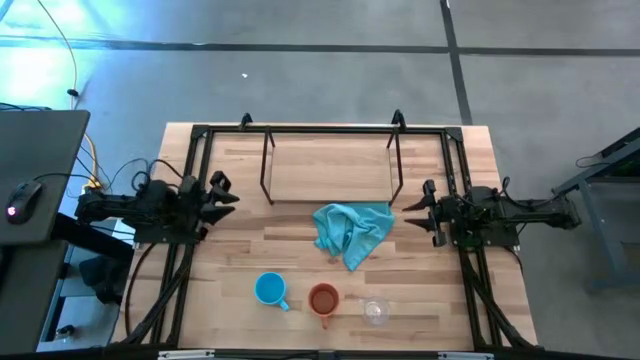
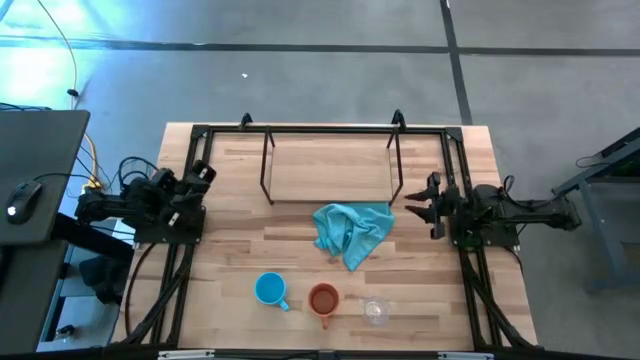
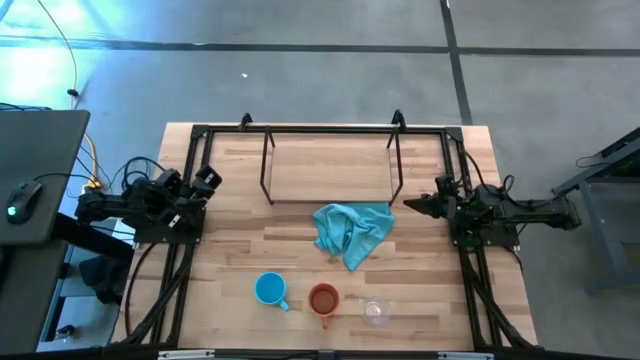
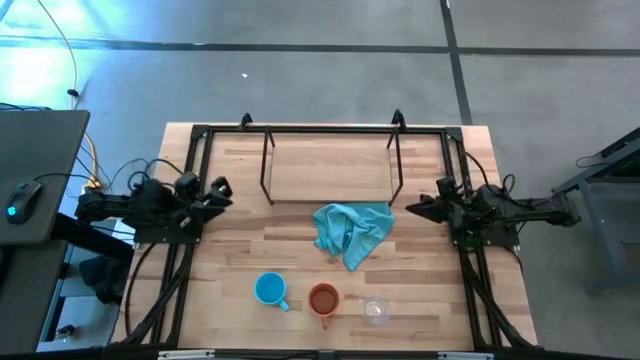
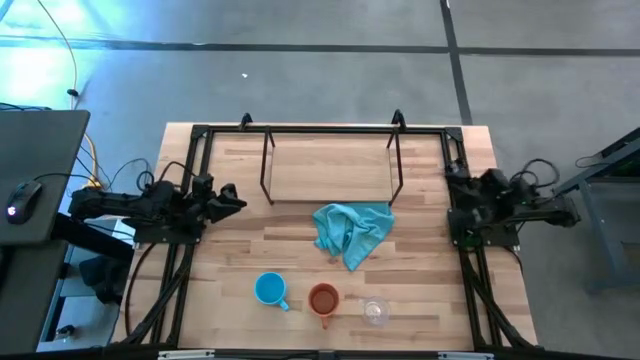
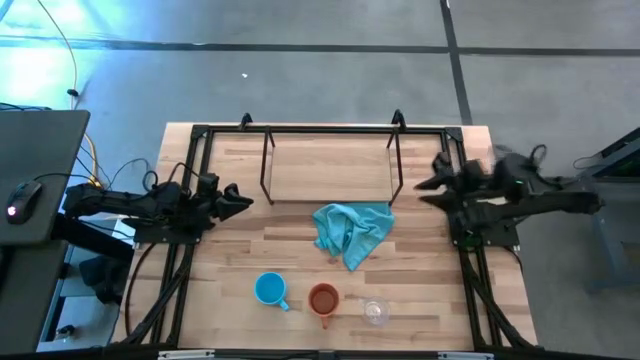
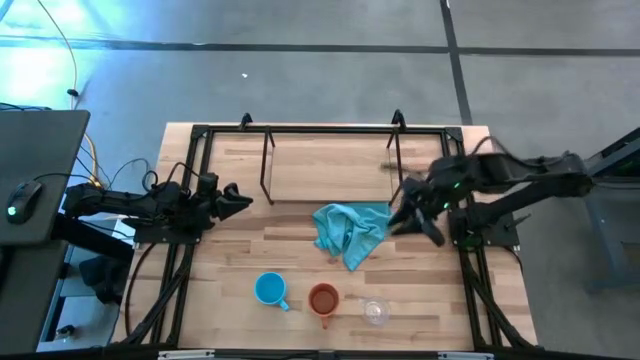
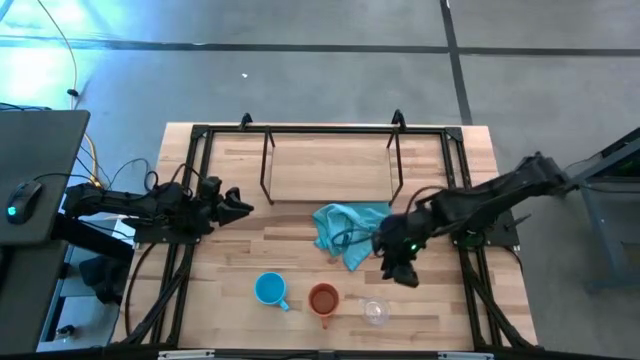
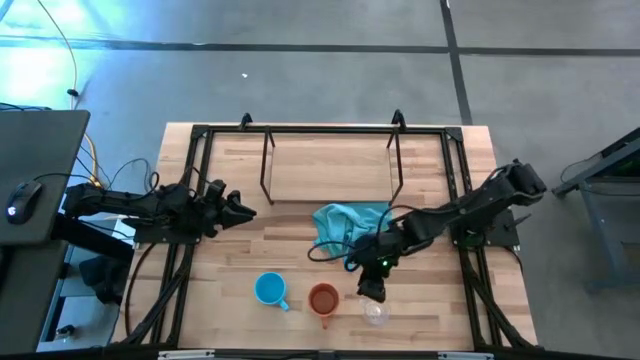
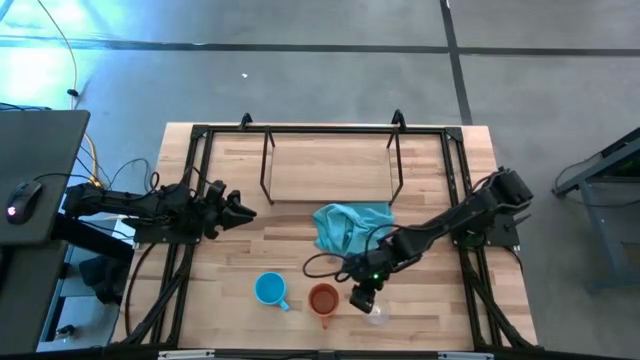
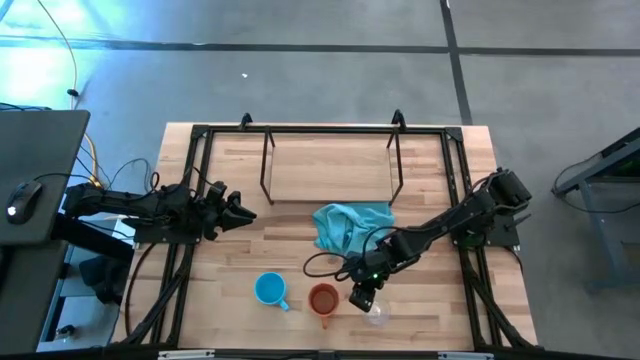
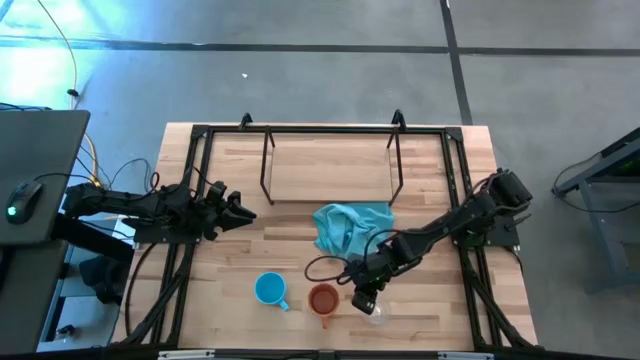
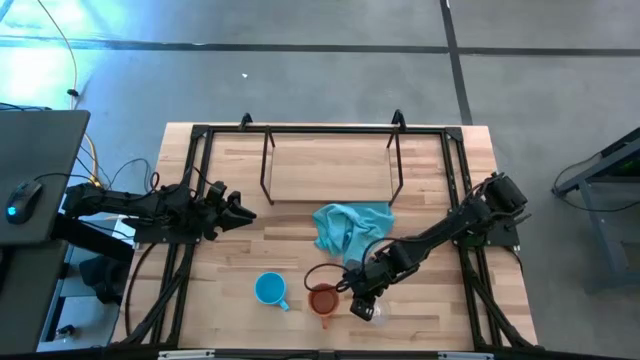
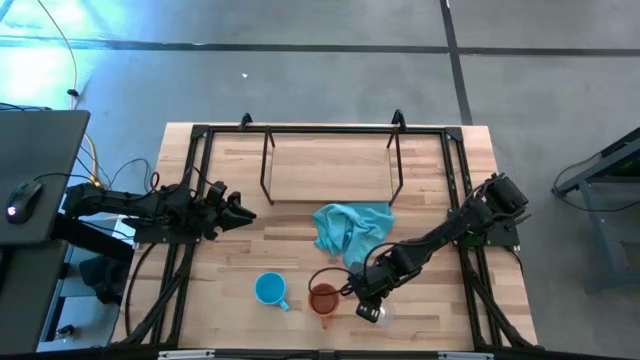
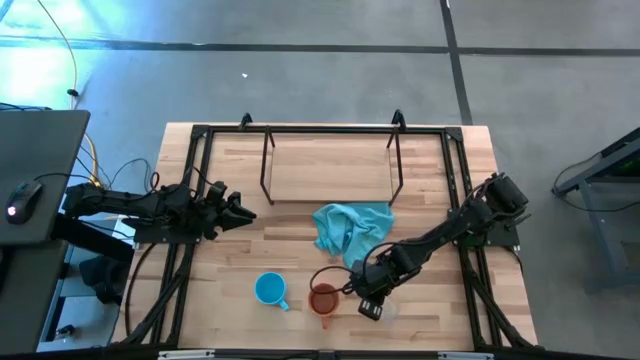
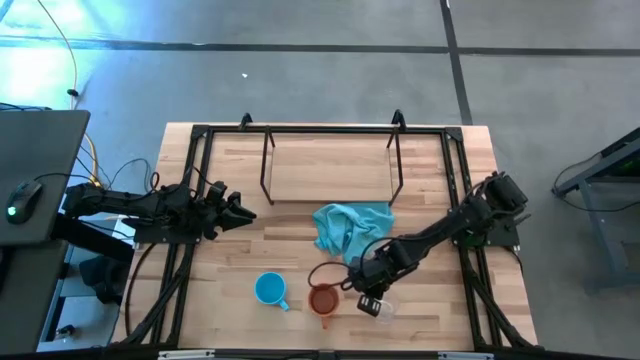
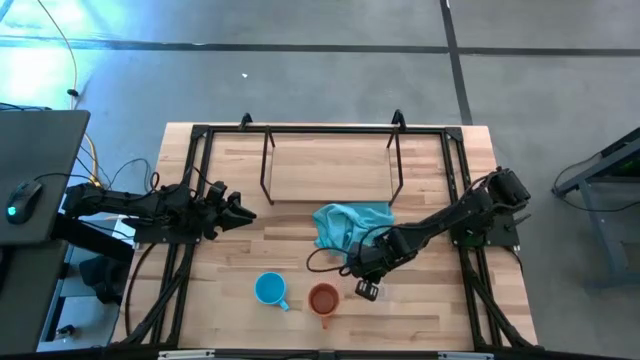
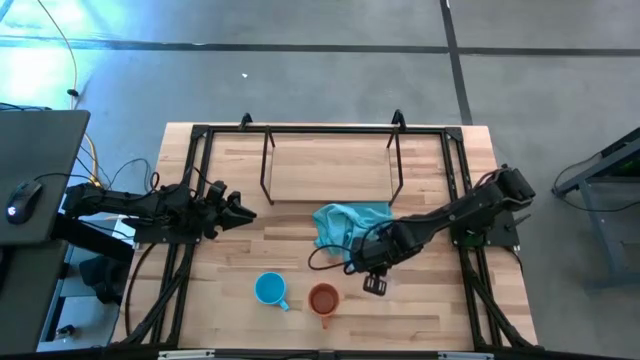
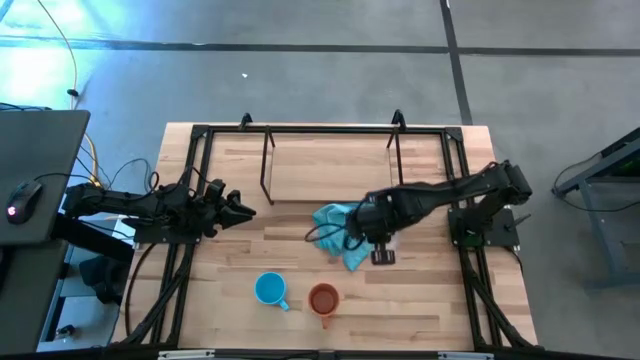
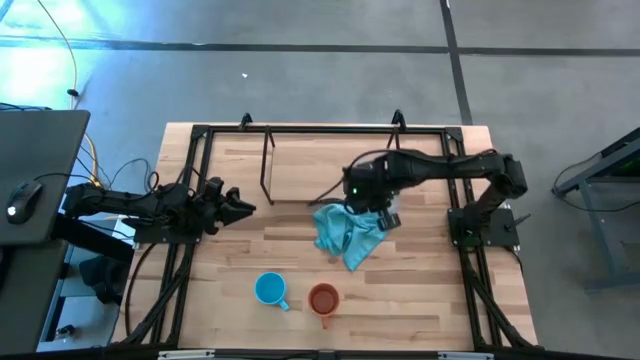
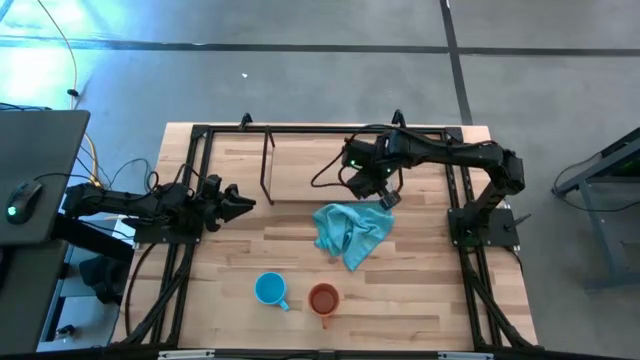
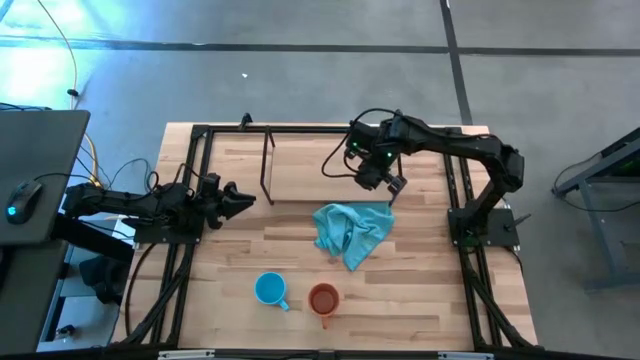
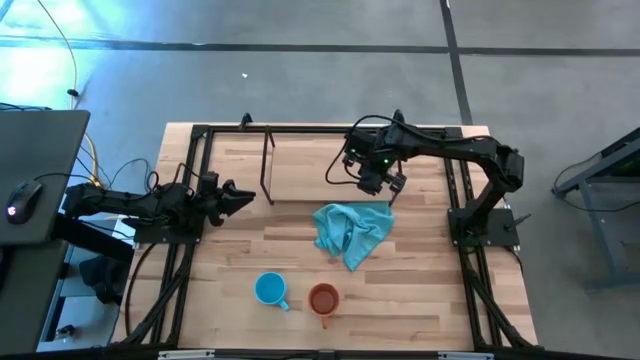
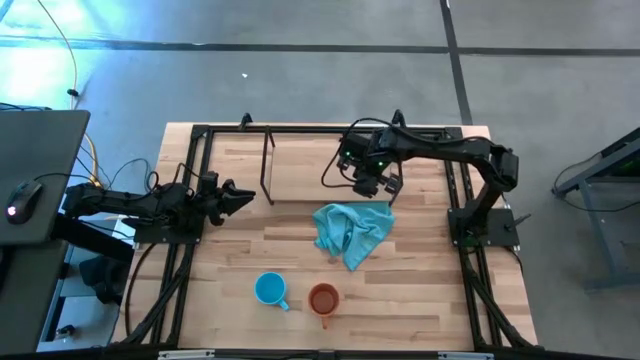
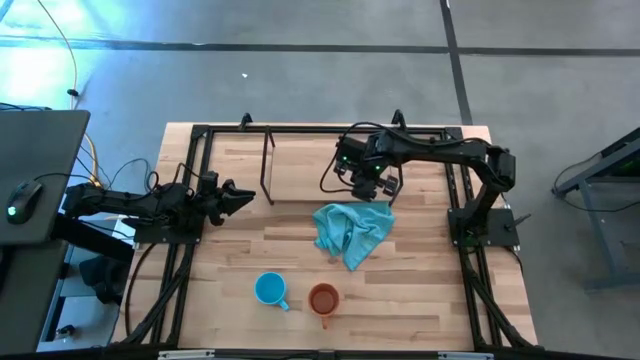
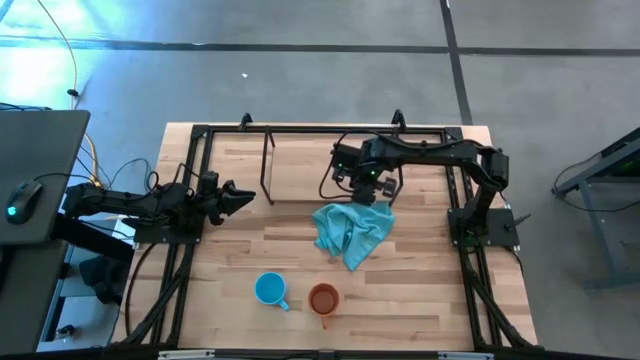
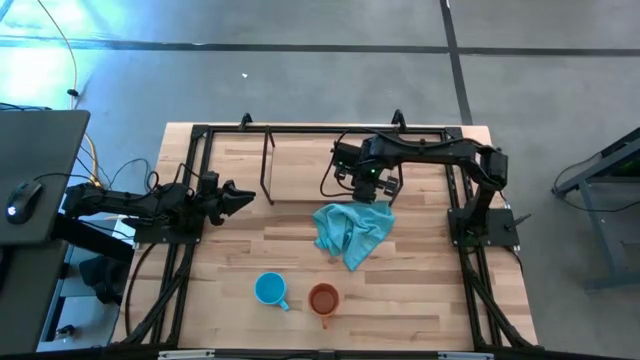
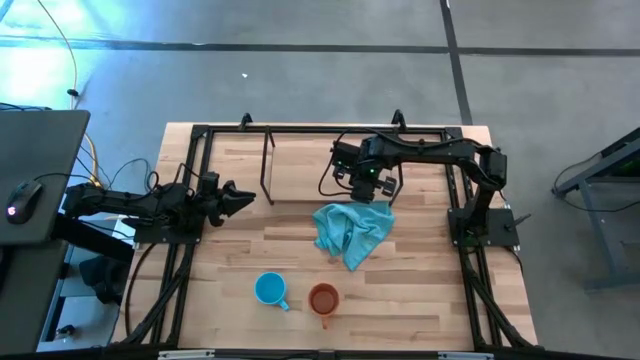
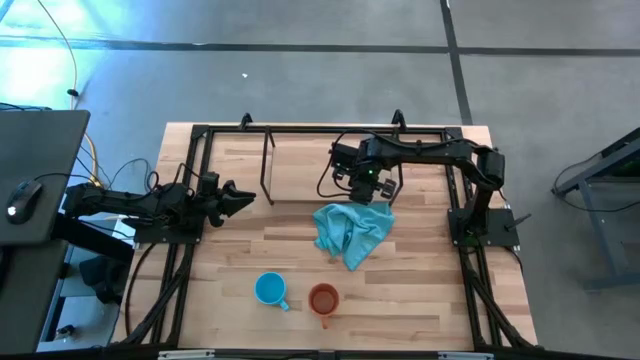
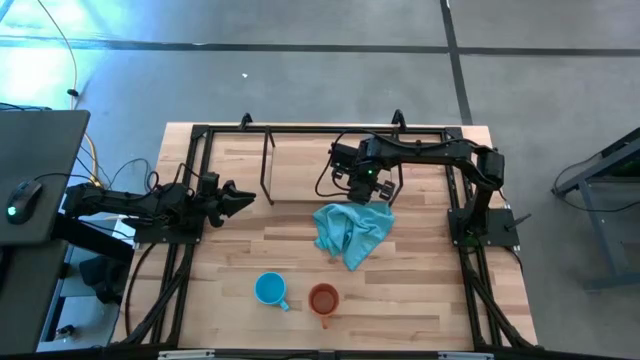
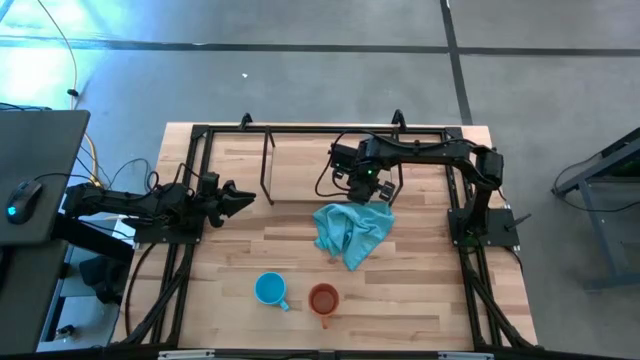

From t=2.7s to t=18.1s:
Task: Stack small to large cups/mugs on shelf
Put the transparent mug on the shelf
